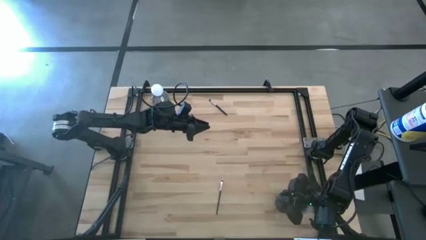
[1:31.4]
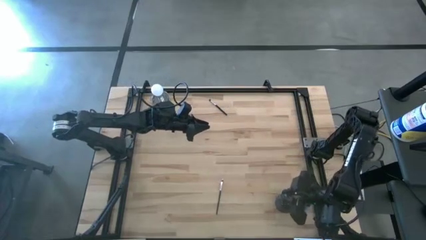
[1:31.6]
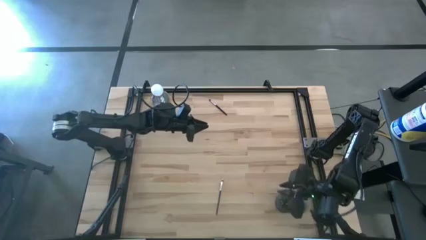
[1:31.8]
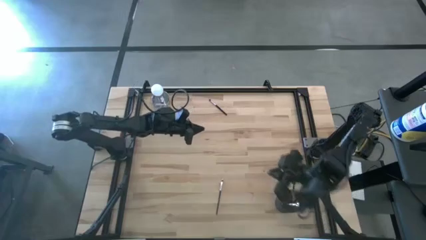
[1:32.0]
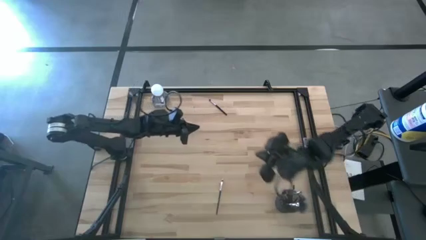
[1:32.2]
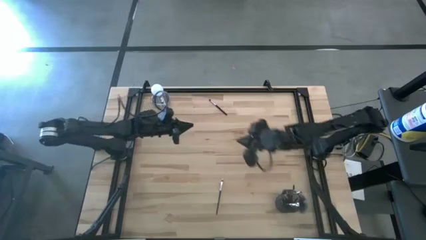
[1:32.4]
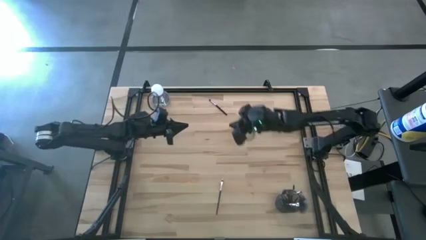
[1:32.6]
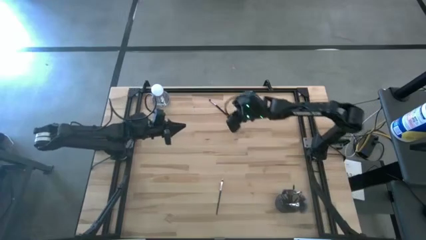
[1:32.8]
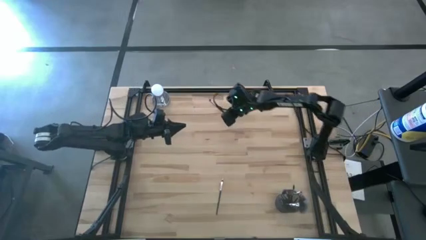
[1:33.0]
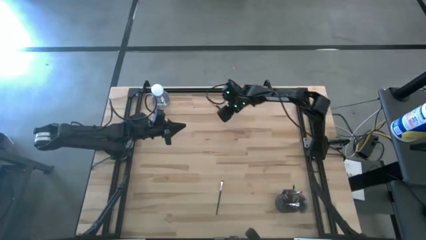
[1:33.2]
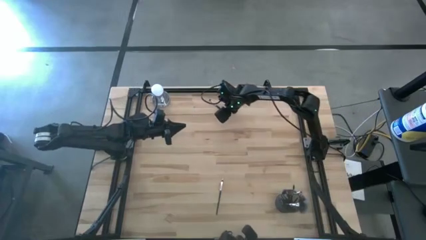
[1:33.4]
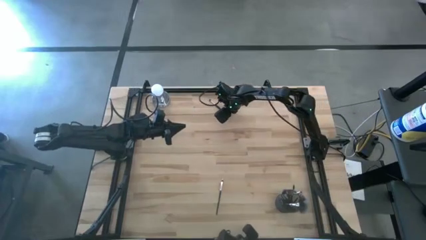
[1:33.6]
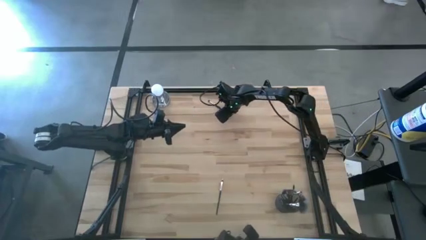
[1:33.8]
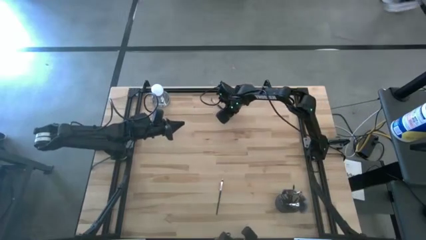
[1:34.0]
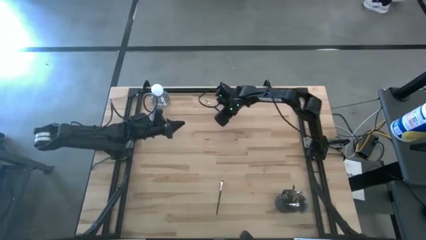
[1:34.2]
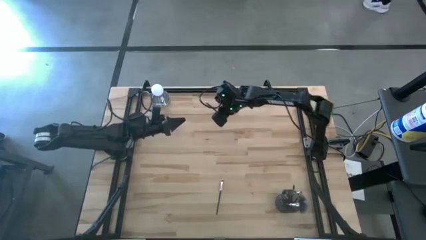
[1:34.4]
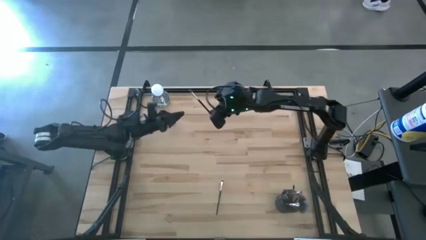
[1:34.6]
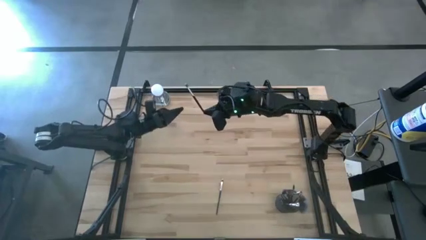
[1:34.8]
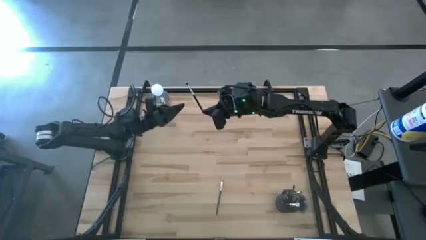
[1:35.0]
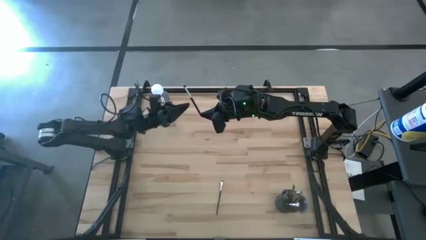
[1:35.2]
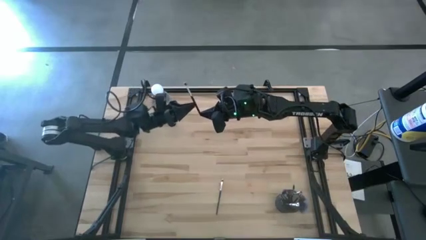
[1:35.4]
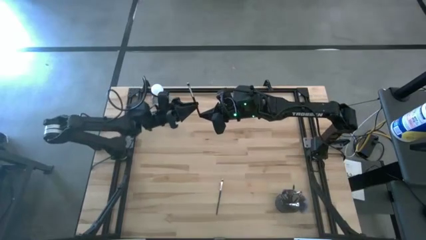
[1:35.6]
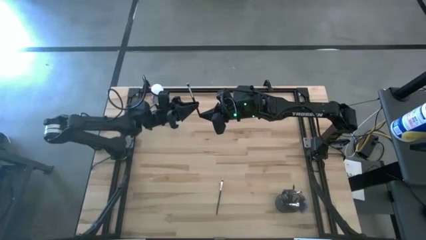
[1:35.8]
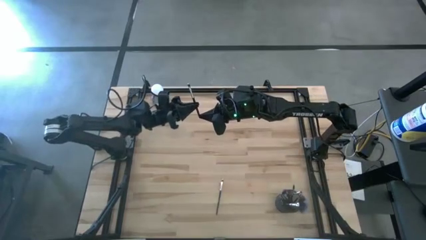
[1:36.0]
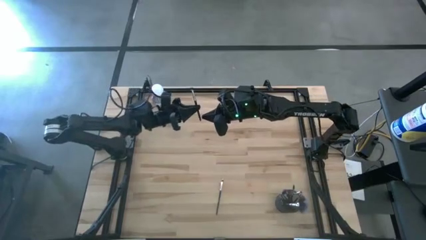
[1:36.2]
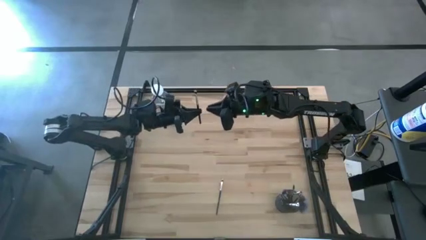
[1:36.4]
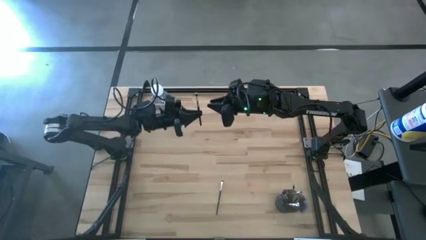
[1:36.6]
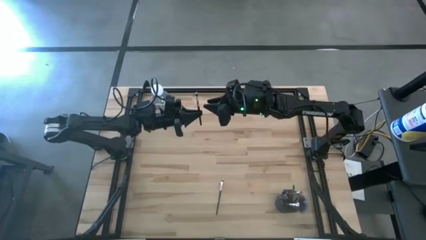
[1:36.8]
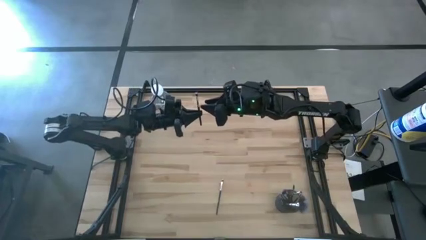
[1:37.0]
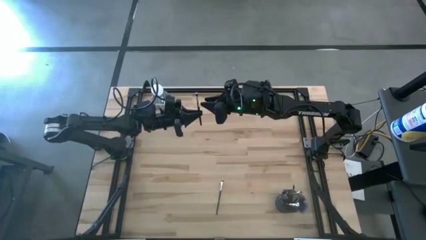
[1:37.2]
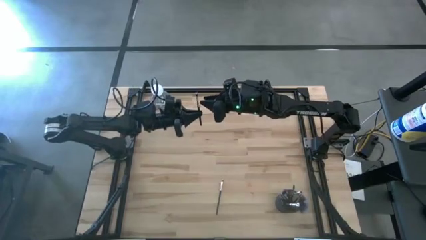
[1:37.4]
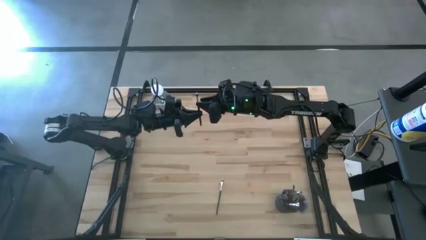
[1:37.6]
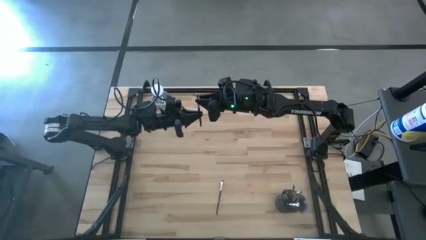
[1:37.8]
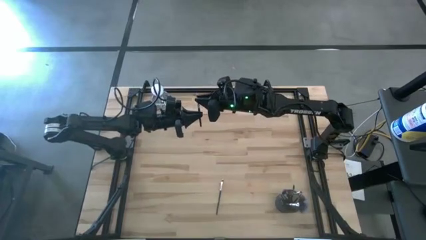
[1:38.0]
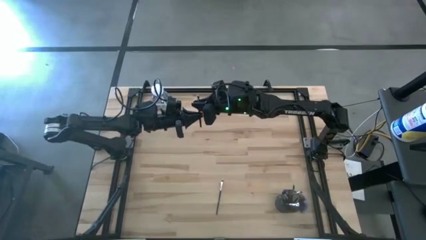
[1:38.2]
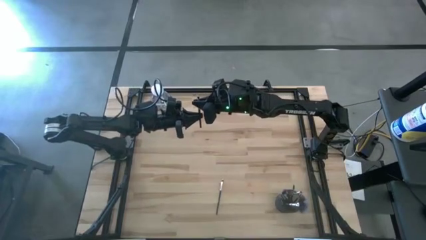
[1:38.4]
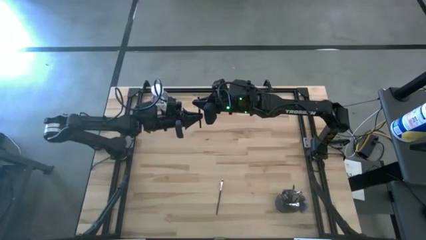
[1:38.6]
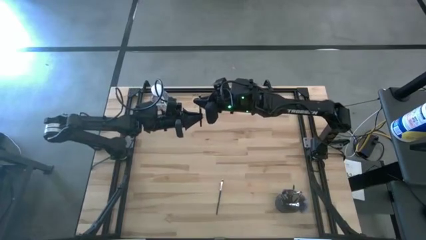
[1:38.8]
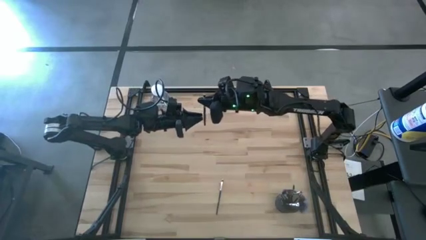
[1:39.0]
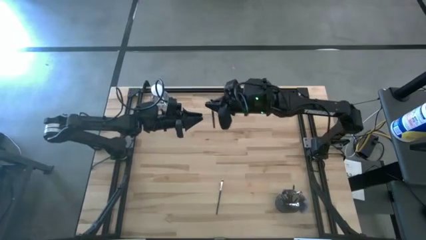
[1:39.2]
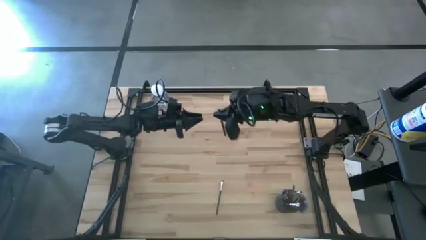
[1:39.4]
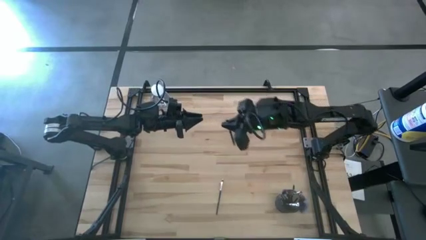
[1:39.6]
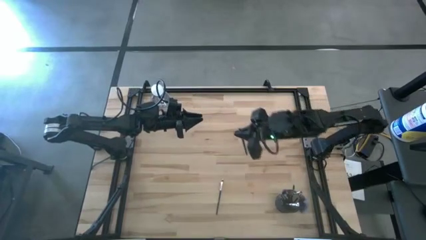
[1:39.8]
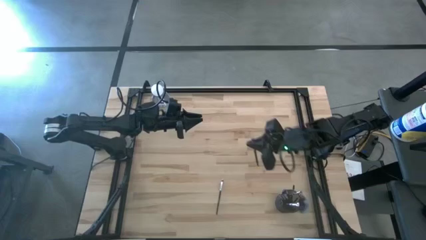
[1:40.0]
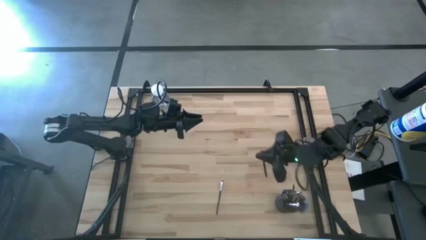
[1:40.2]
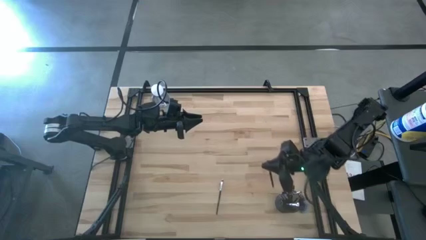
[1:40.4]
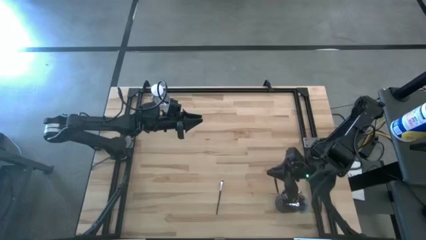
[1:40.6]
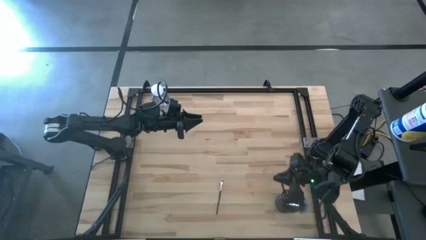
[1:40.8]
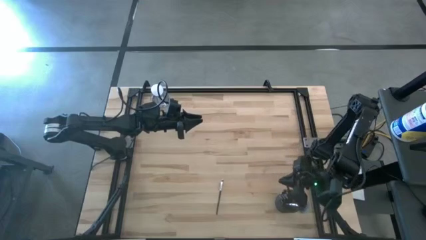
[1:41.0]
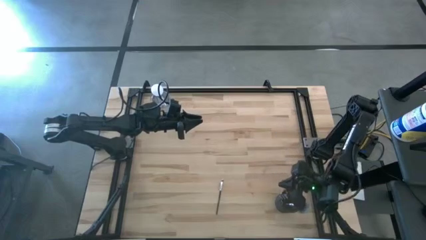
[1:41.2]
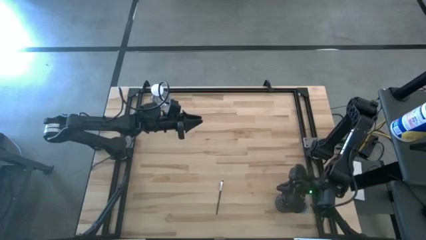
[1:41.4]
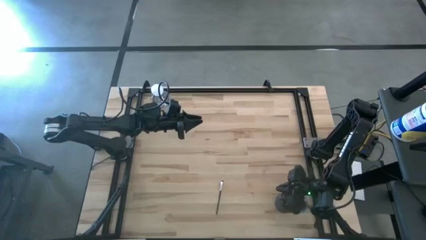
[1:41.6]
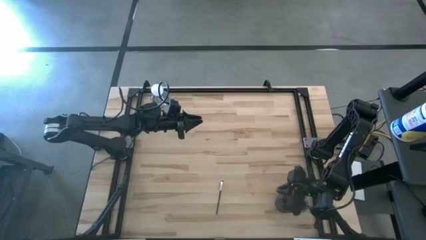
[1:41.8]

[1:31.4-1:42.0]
Task: Put items in baskets/containers
Put the blush brush into the brush holder

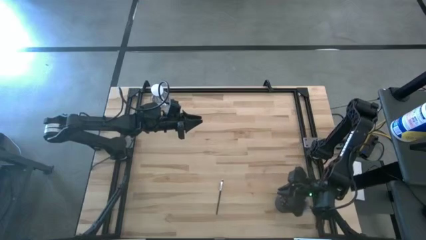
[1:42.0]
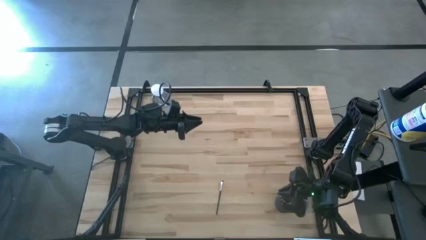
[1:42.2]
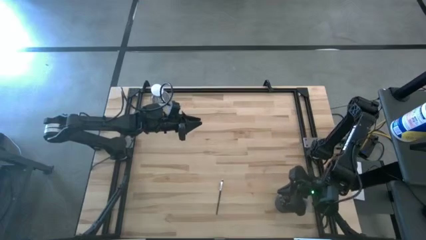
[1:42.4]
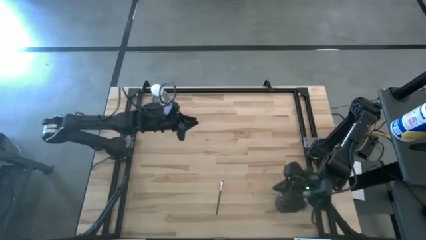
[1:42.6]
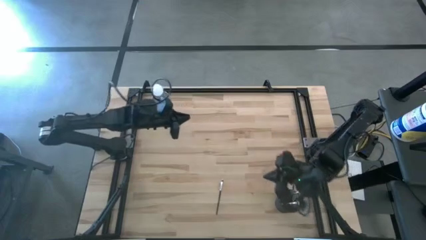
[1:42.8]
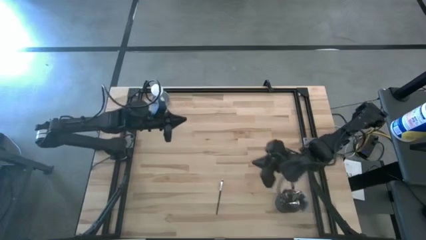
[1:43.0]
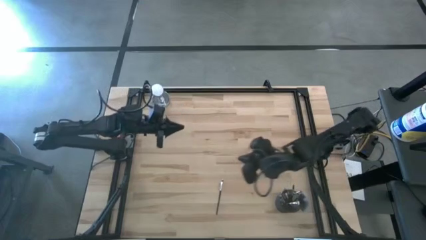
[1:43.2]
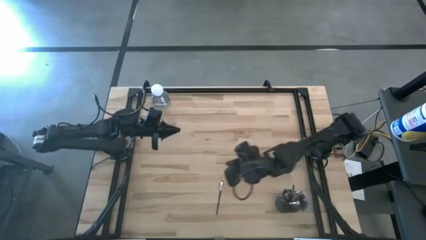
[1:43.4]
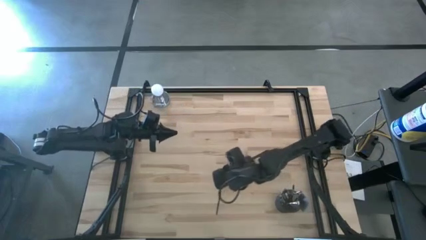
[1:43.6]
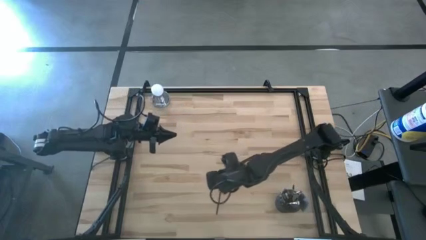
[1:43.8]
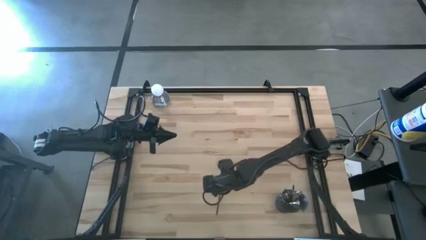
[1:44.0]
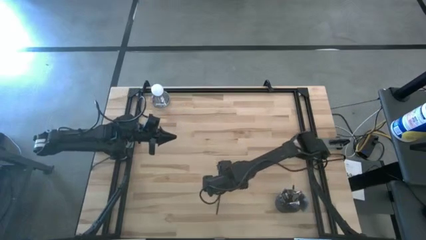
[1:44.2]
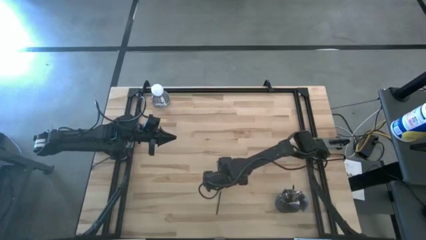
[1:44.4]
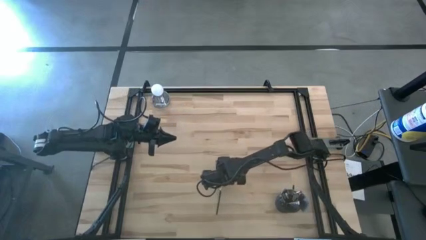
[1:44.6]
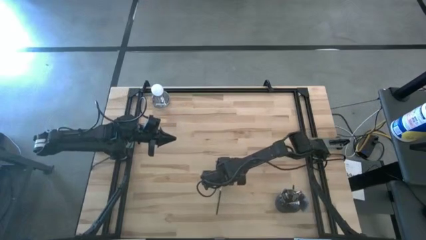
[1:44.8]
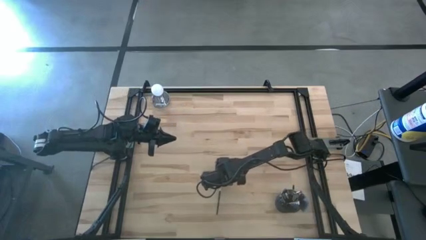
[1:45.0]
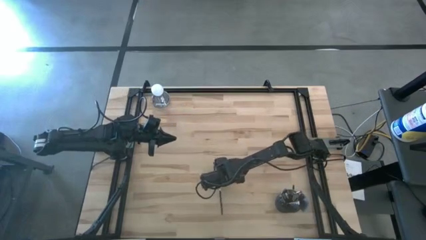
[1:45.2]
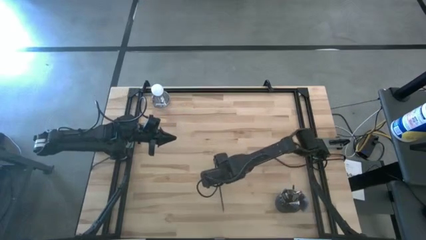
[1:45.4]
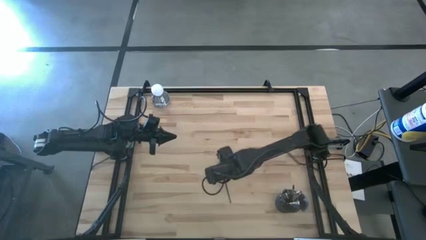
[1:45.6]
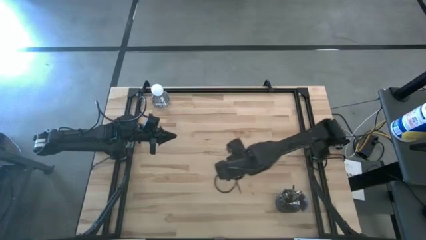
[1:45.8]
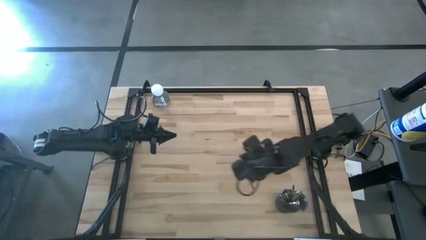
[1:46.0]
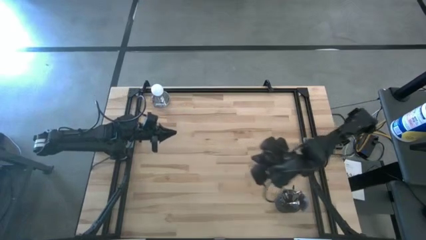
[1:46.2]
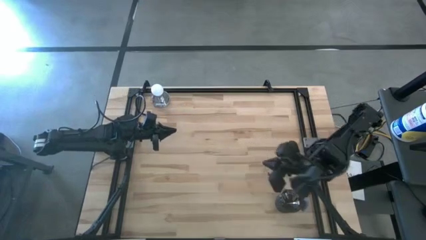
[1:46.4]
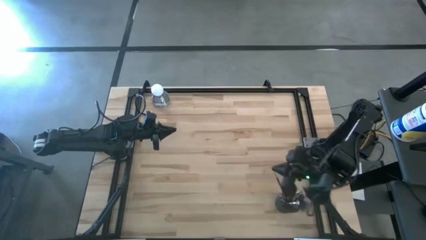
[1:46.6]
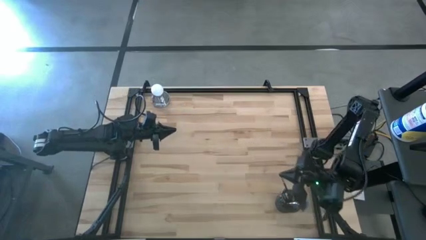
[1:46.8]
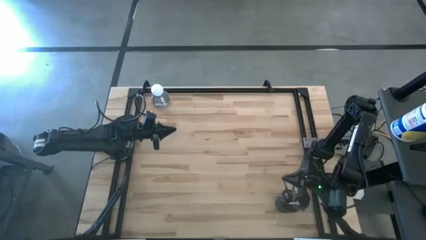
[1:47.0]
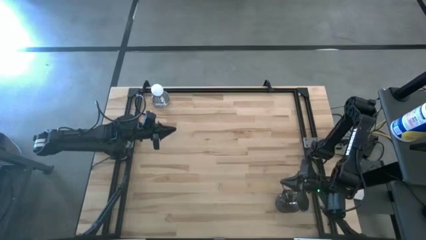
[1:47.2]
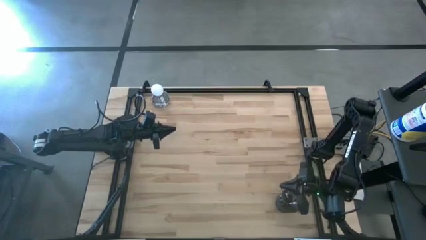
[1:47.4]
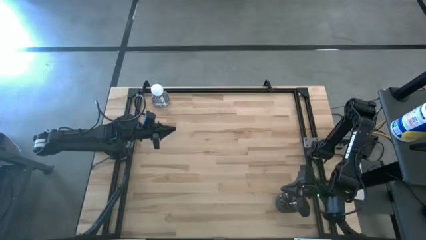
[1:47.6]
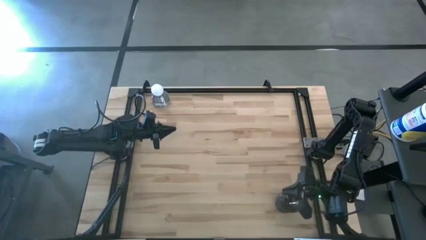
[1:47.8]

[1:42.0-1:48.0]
Put the eyeshadow brush into the brush holder
